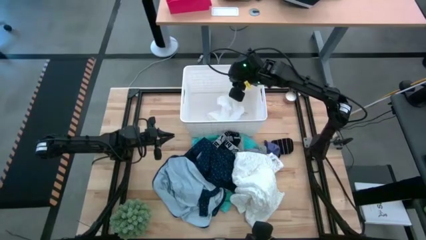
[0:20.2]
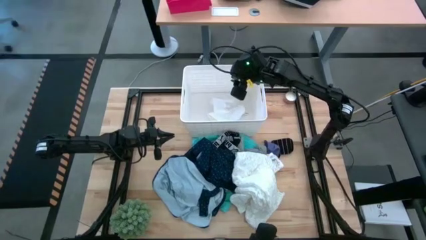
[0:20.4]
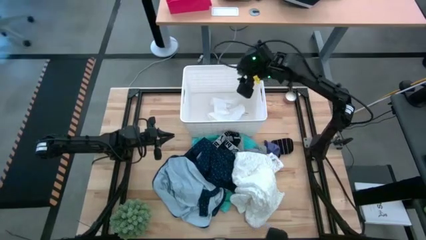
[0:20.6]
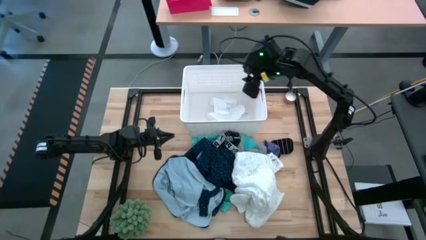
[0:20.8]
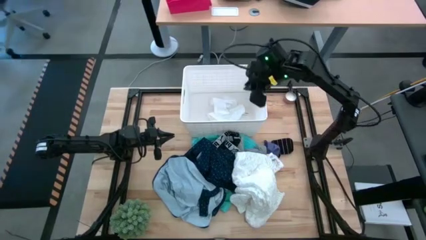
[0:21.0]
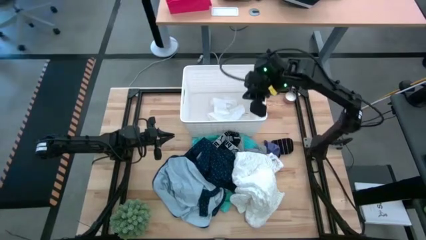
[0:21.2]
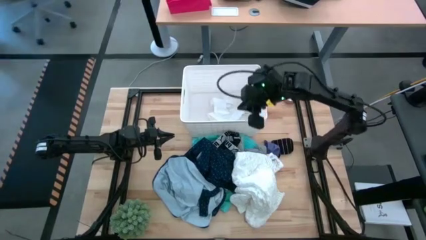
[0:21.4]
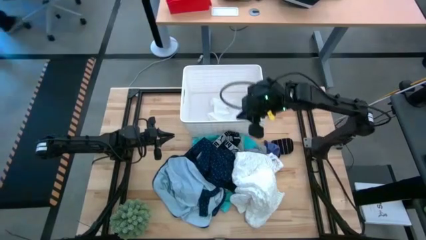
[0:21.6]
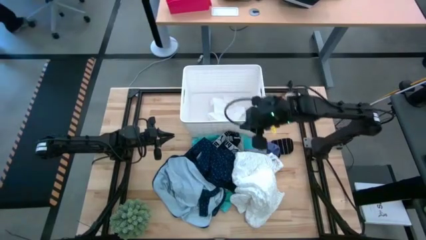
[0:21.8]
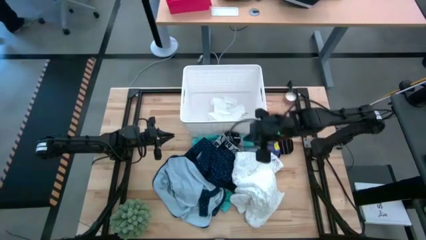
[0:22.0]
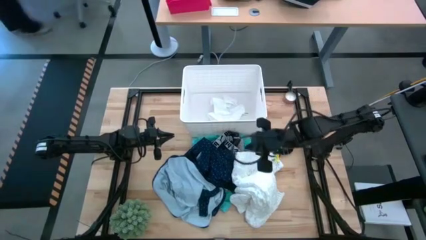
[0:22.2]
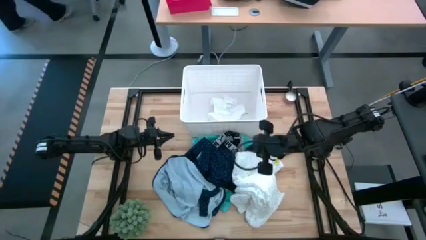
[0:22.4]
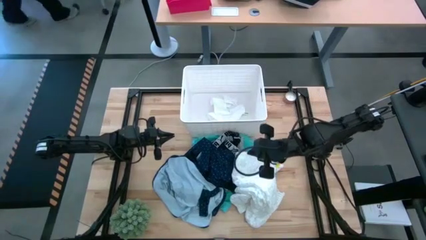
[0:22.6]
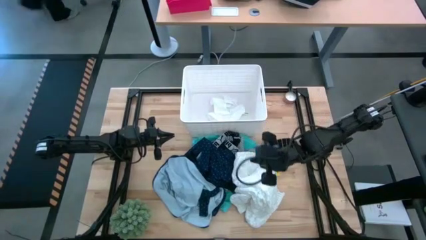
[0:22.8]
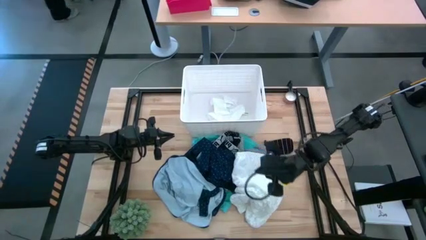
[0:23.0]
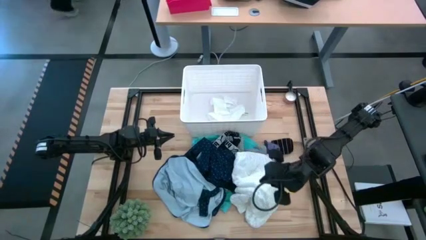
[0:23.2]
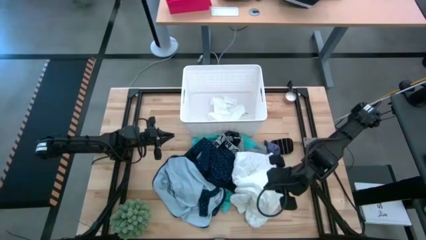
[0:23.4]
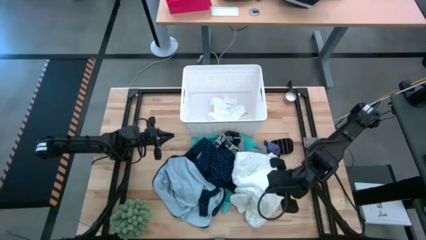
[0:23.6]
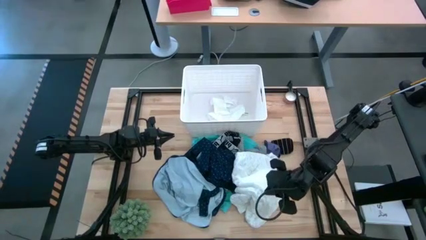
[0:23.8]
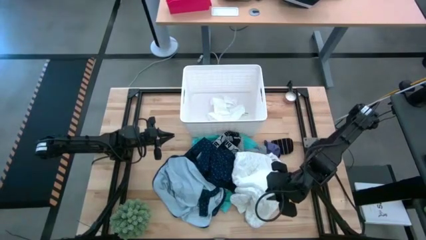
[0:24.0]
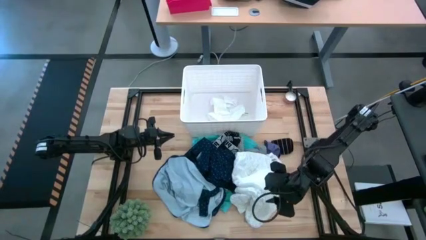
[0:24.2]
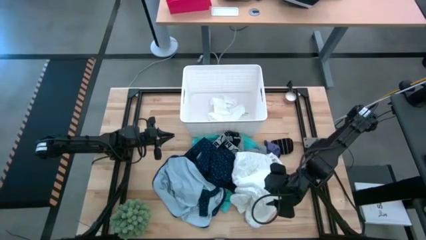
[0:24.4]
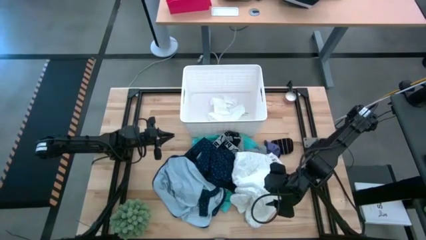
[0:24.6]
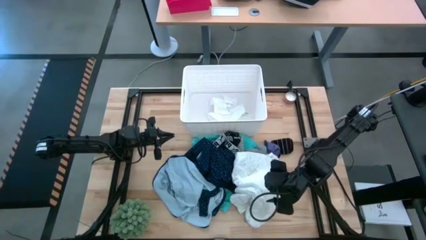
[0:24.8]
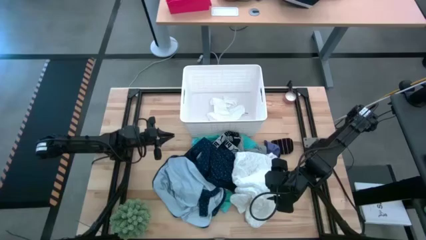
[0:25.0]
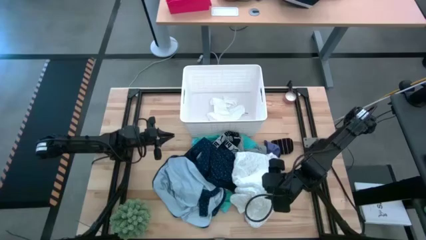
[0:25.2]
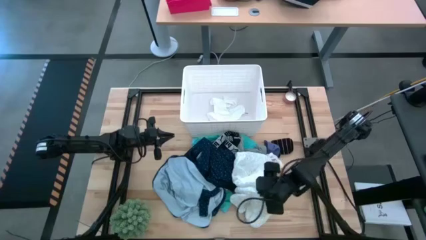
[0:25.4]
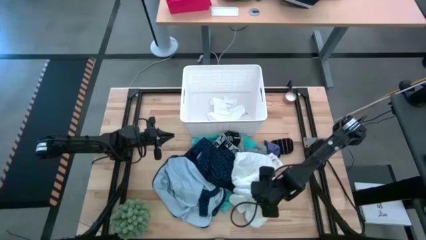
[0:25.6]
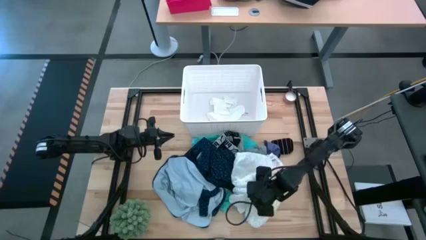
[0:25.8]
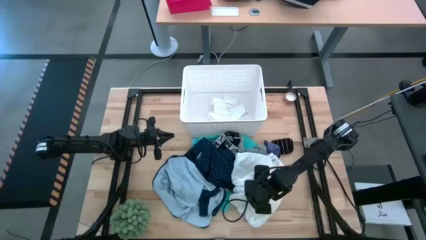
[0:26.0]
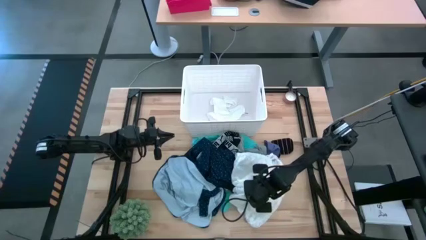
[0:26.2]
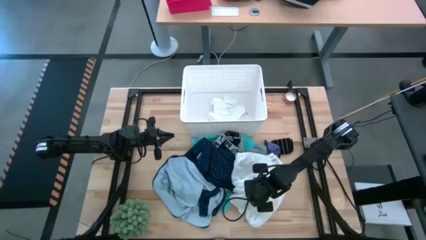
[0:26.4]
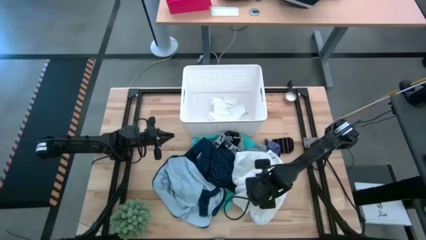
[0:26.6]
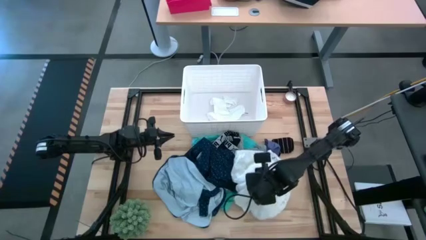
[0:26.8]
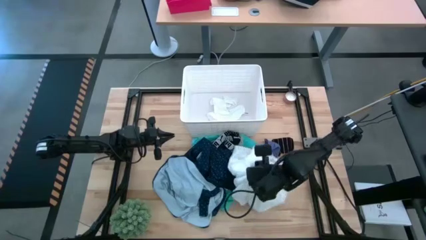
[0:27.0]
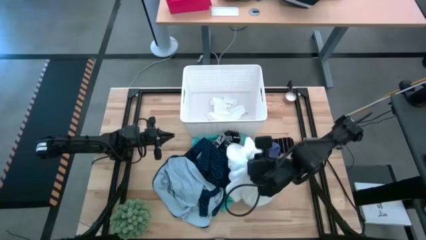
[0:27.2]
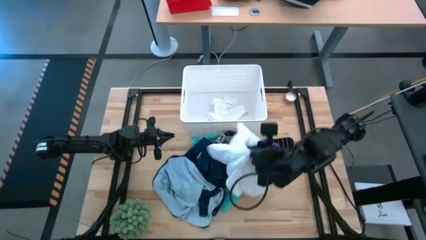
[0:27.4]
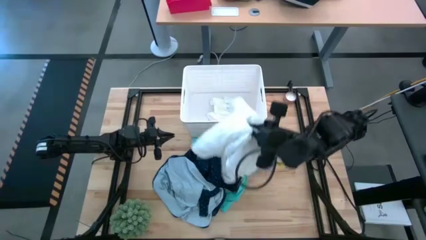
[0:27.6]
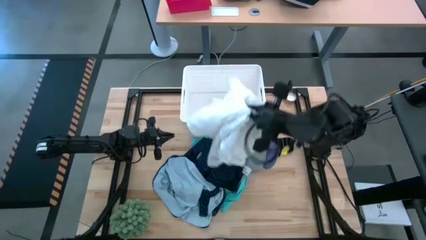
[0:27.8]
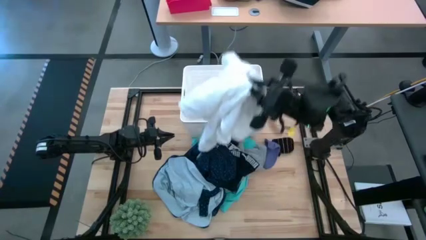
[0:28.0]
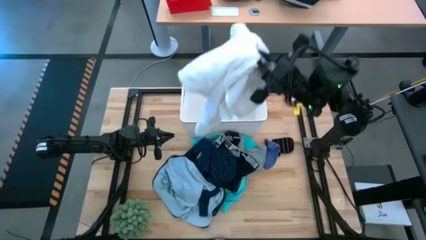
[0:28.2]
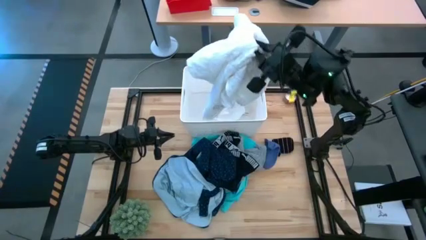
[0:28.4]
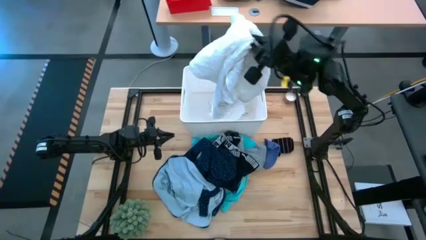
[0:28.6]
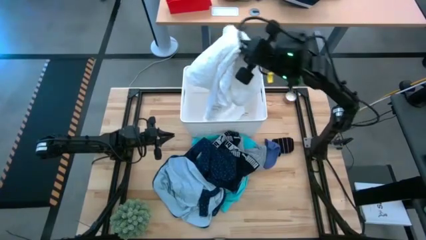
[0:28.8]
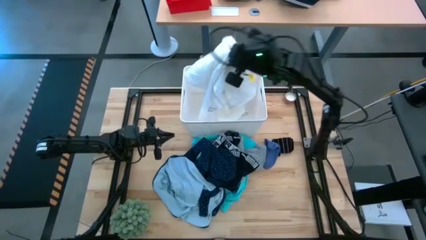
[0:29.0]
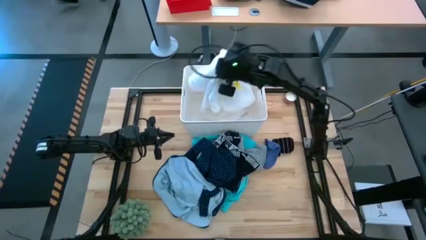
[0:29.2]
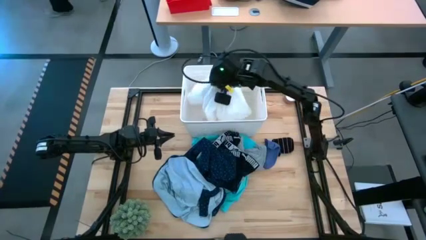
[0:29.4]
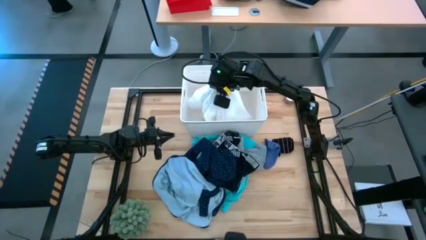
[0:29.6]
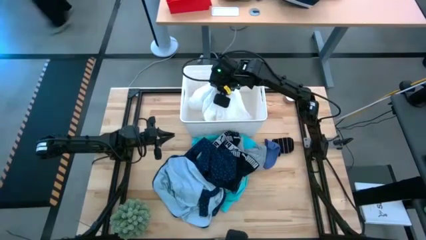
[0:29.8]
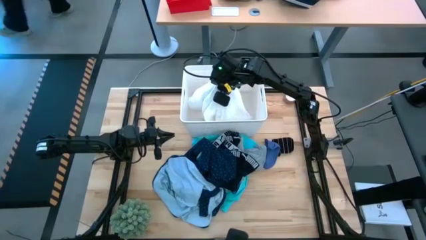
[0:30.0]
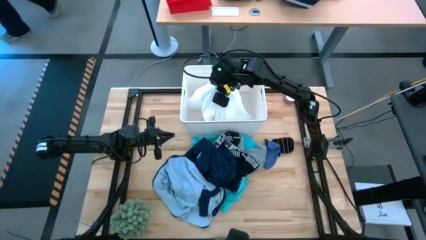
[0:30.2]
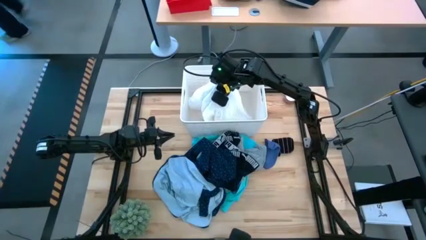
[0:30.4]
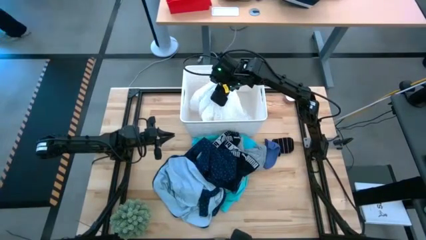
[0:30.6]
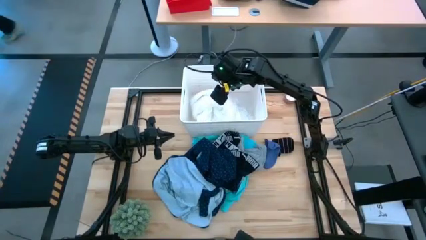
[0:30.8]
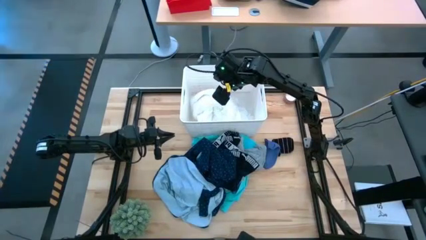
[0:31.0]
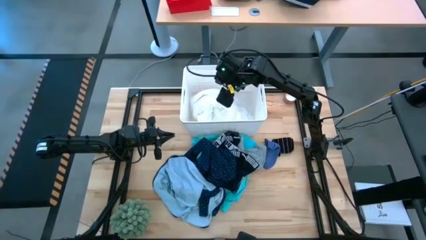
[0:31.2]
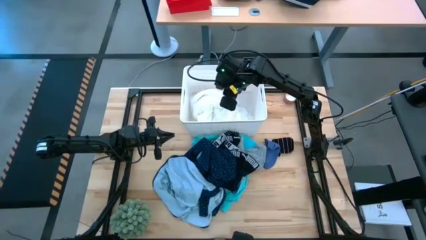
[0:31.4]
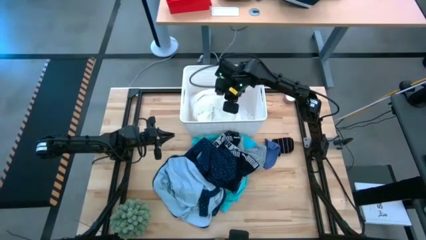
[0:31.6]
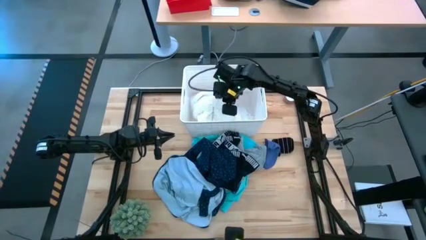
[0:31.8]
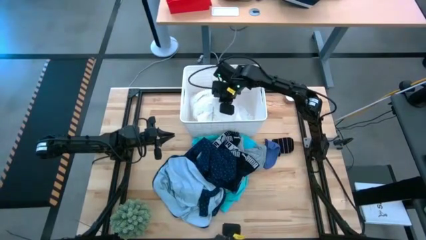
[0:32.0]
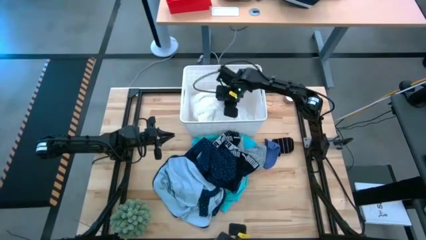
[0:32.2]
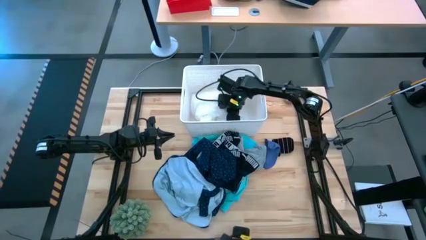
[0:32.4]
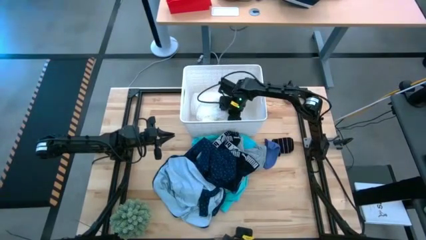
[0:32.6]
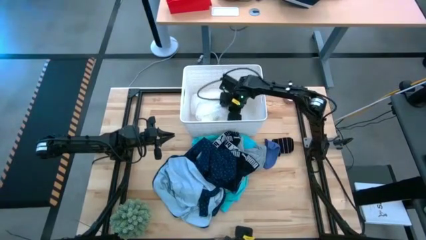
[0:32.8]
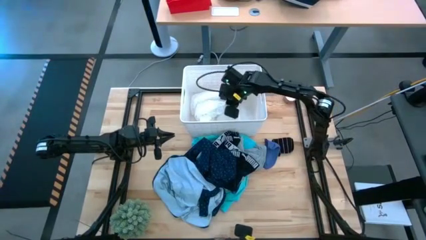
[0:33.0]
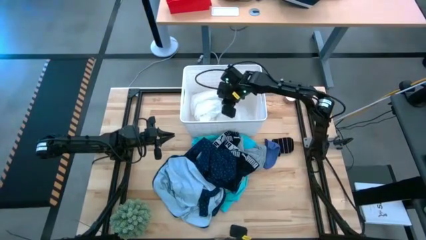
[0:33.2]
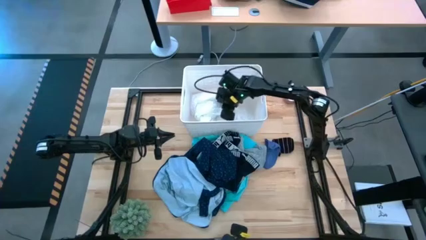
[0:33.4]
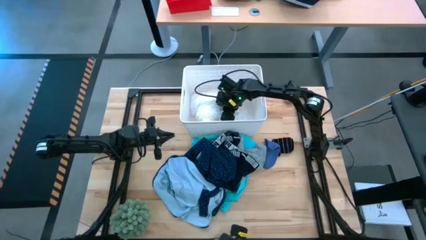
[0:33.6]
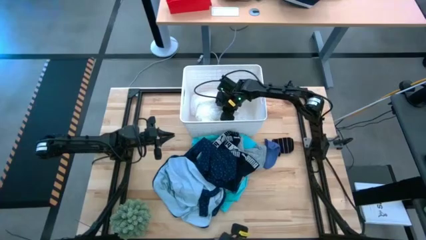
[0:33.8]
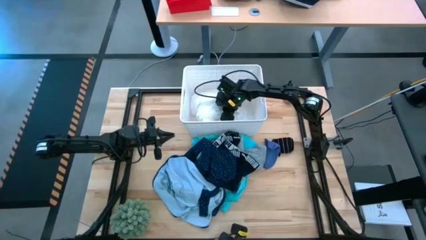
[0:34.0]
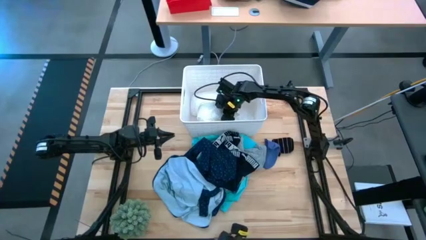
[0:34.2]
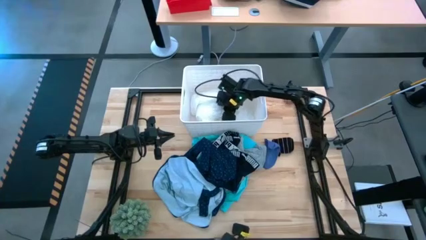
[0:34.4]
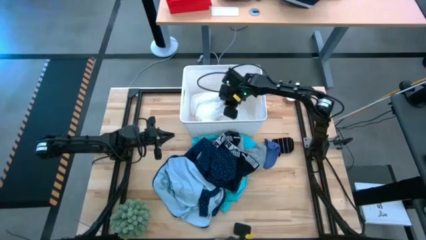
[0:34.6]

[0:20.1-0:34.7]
Task: Sort clothes
Put the white dress into the white bin
